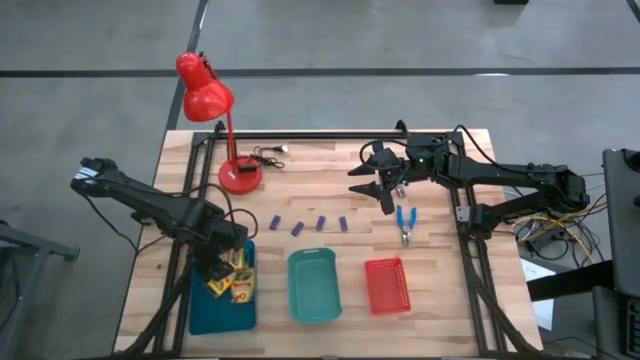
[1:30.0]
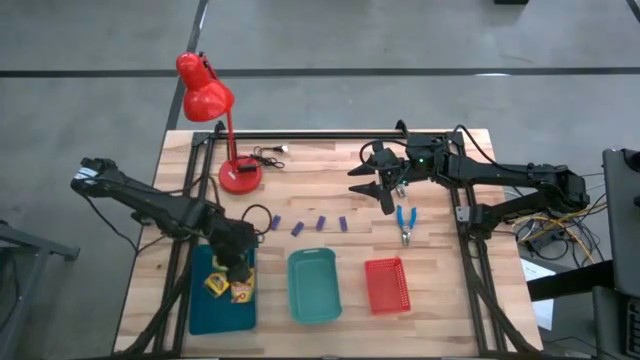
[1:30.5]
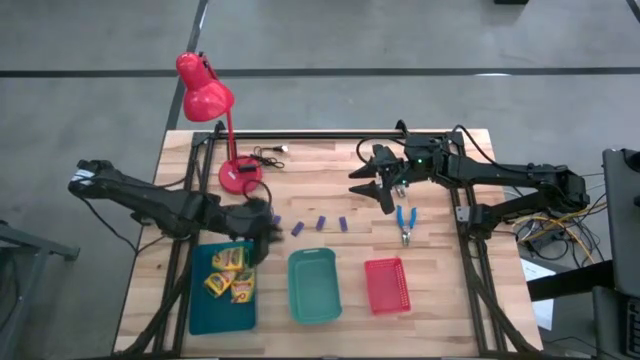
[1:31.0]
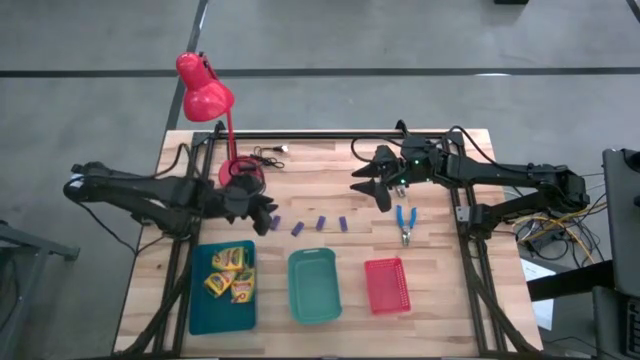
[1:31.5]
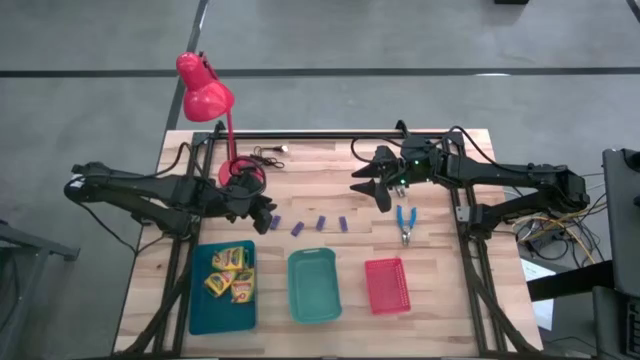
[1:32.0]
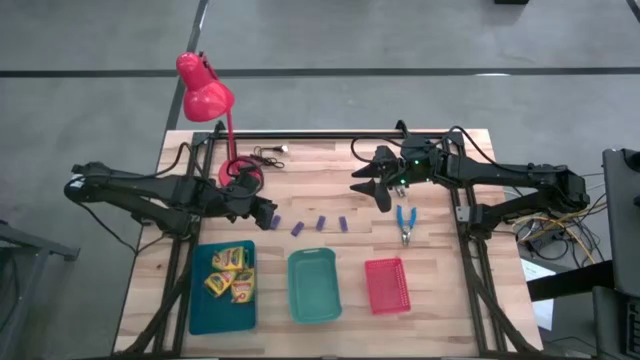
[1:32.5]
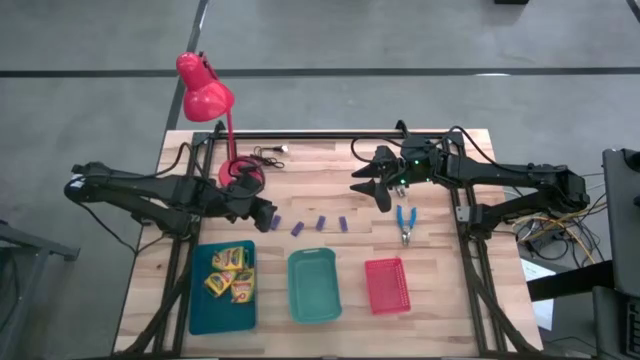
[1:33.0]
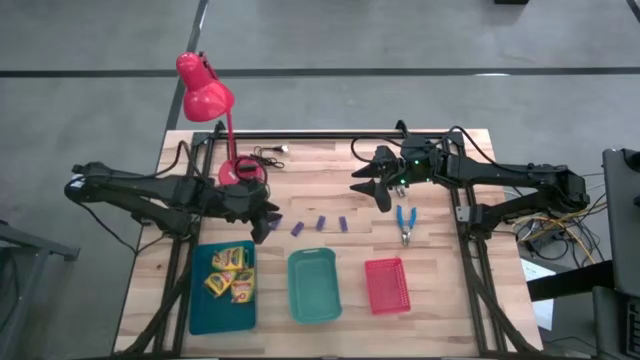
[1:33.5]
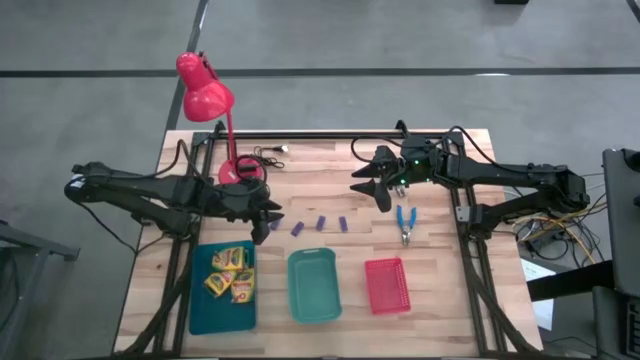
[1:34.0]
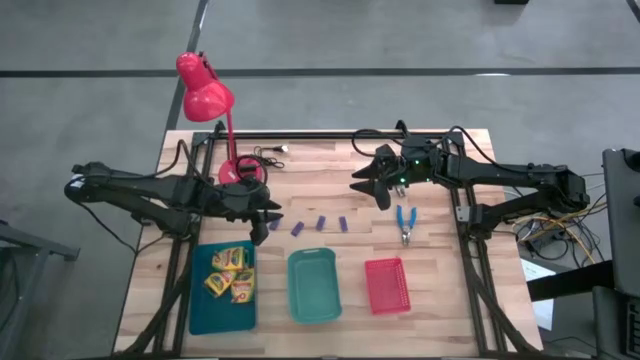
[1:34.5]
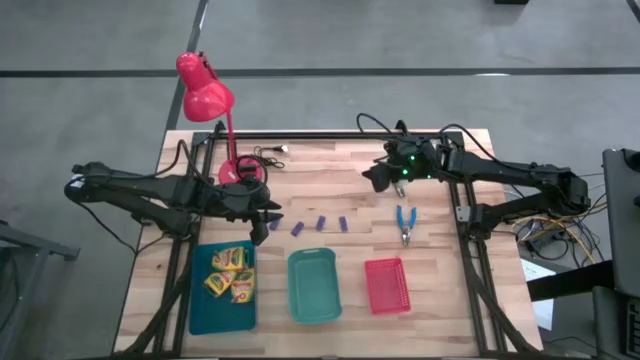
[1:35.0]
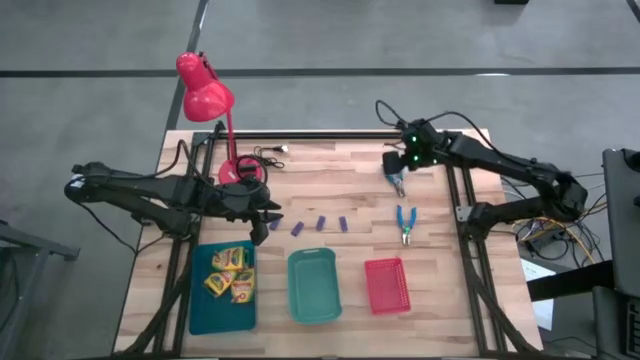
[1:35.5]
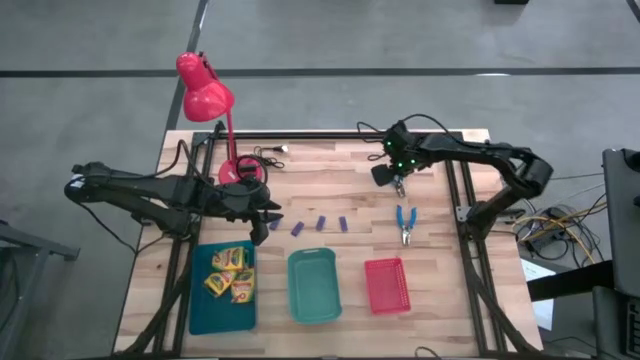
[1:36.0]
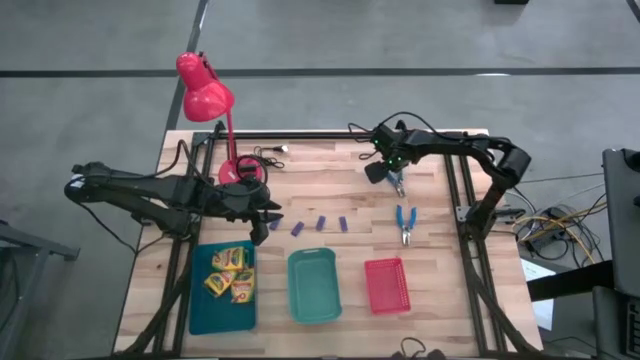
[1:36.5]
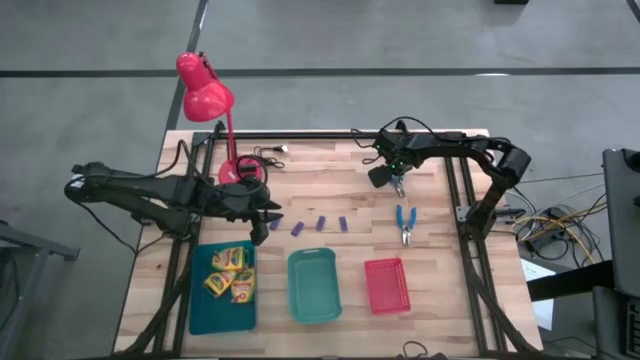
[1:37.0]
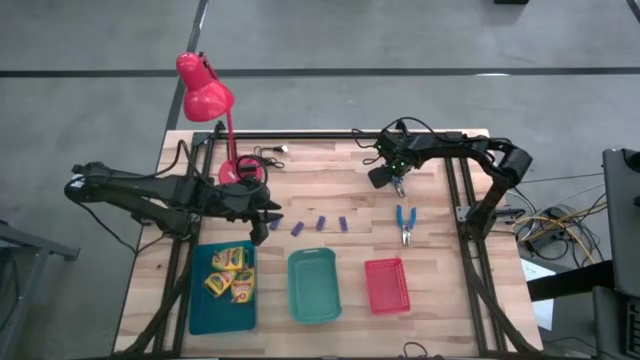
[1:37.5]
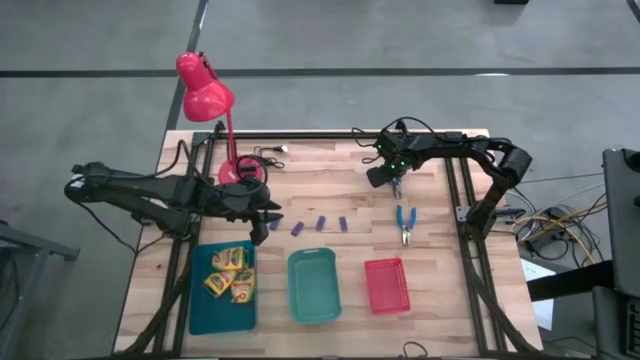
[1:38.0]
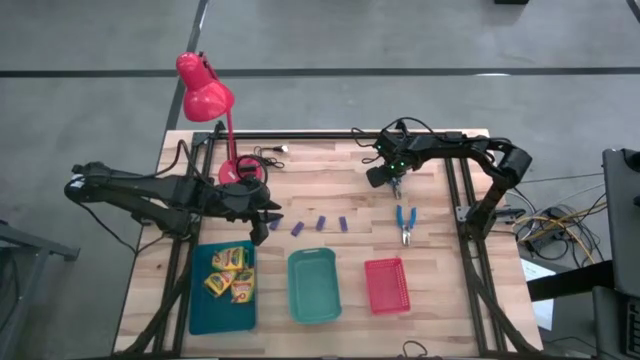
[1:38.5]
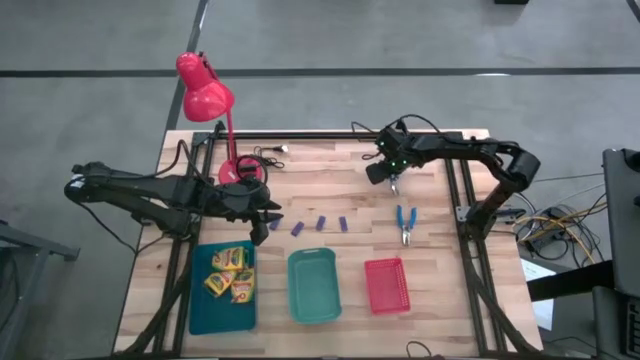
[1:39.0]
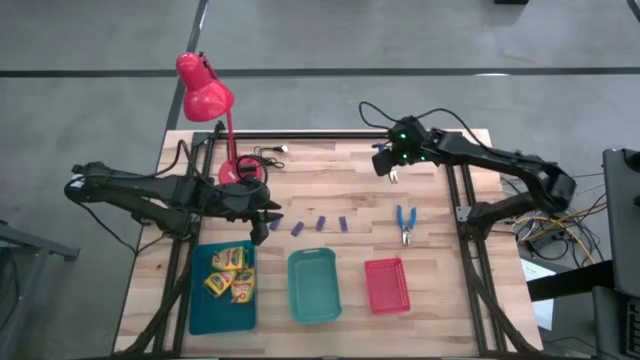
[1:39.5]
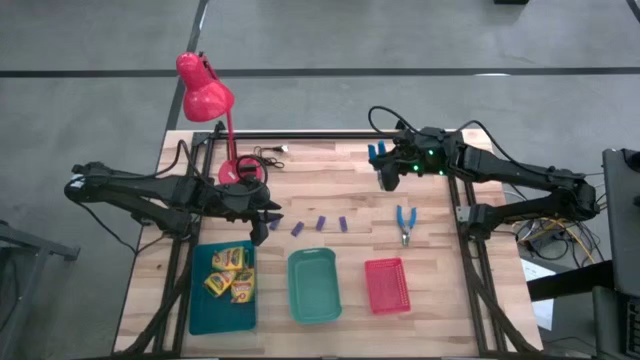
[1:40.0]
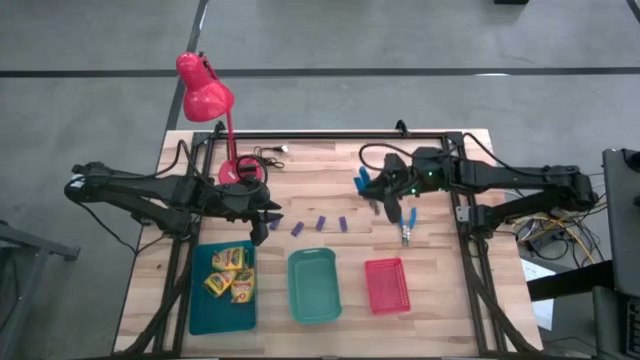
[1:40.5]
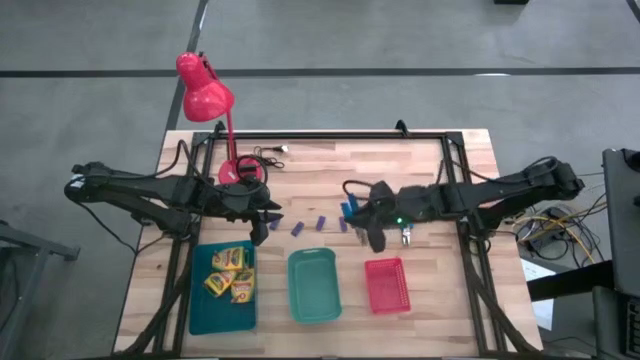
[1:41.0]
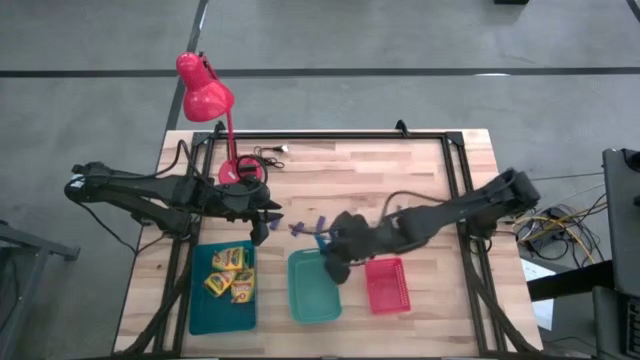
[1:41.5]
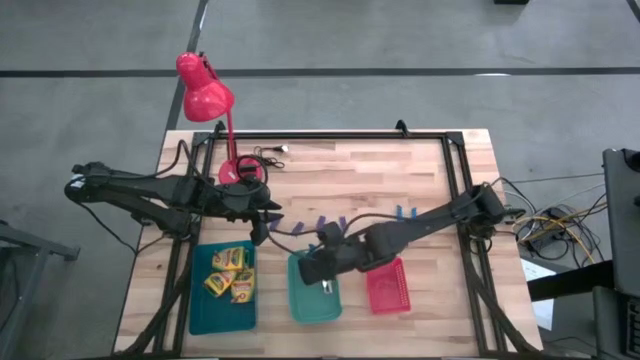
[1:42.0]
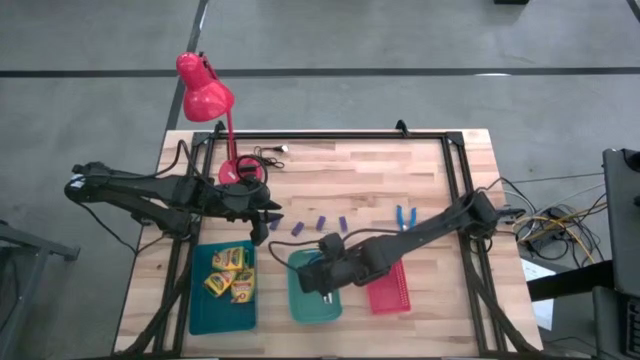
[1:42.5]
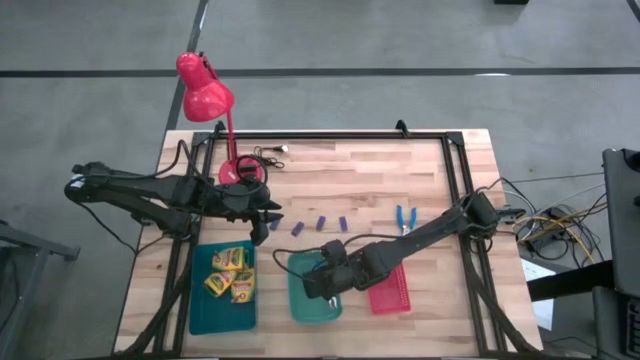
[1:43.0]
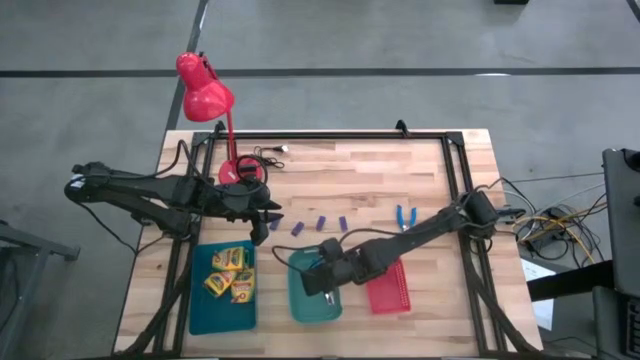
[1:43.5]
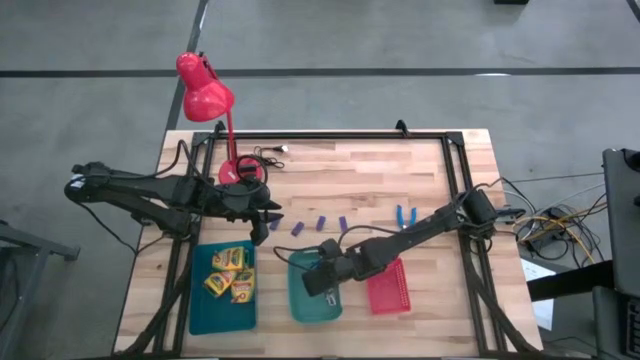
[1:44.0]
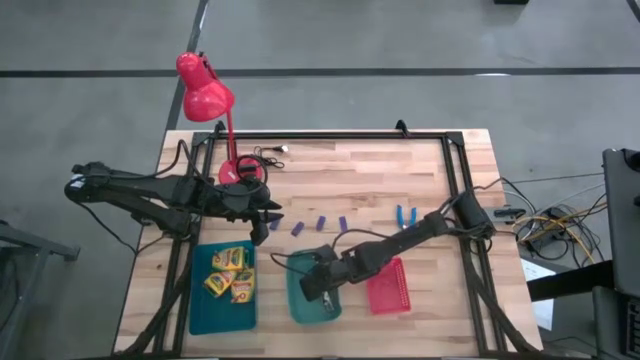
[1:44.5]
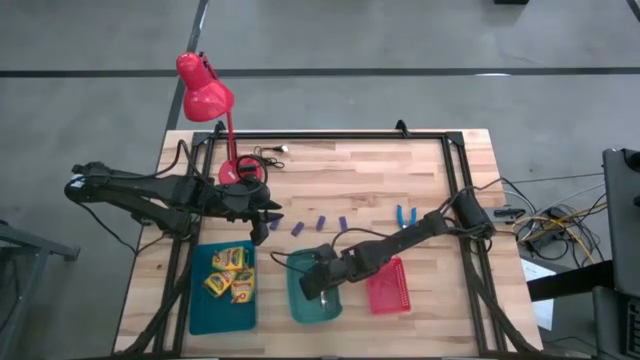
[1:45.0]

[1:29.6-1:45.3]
Task: Pick & Place School Supplies
Put the blue ticket punch into the green bin

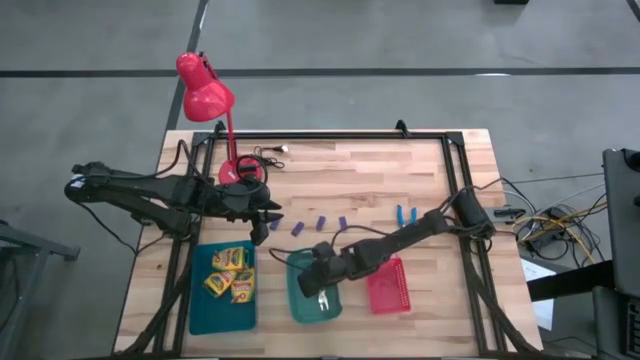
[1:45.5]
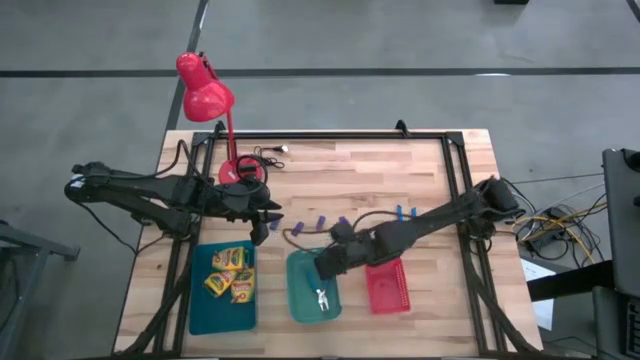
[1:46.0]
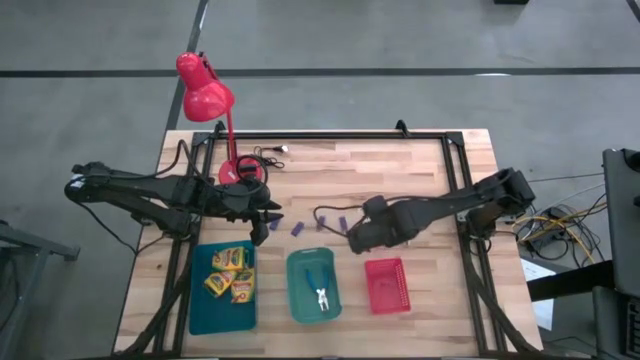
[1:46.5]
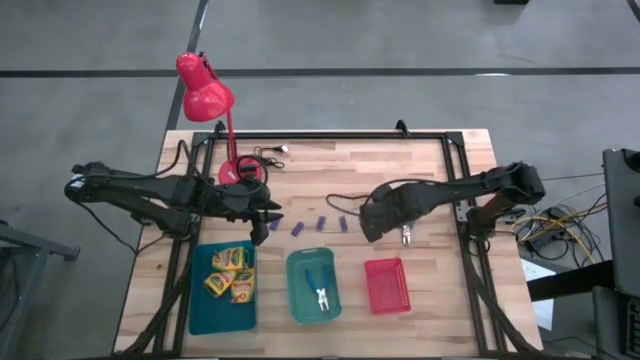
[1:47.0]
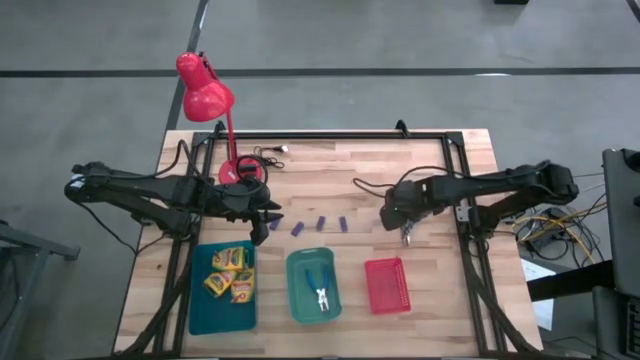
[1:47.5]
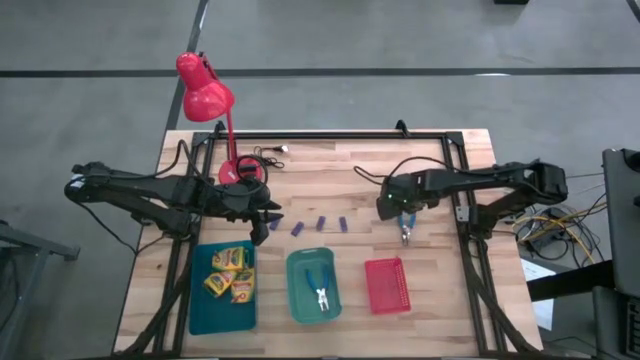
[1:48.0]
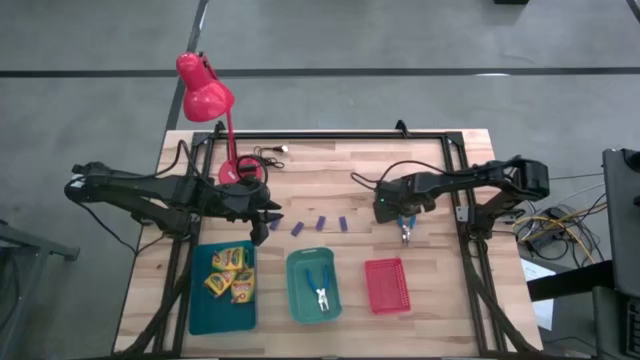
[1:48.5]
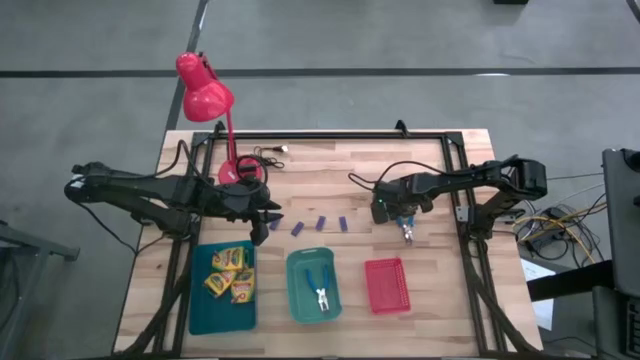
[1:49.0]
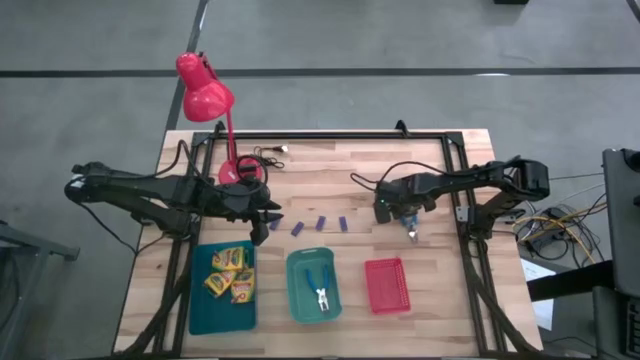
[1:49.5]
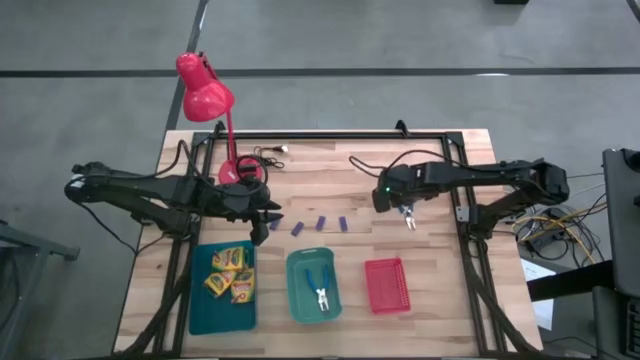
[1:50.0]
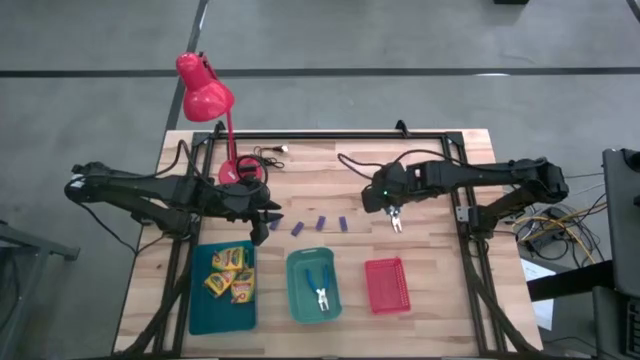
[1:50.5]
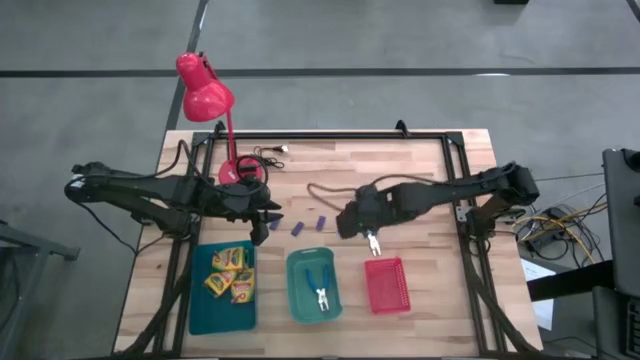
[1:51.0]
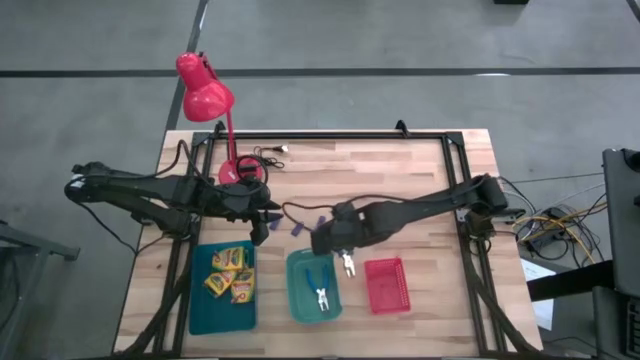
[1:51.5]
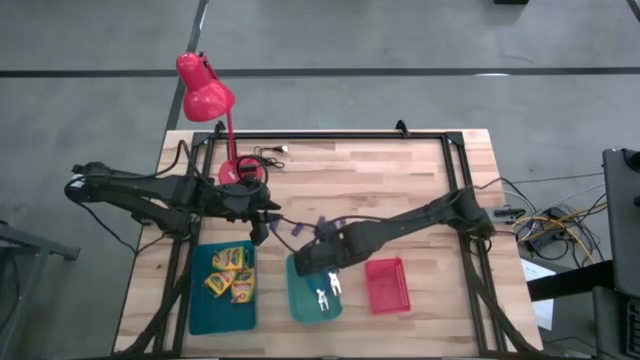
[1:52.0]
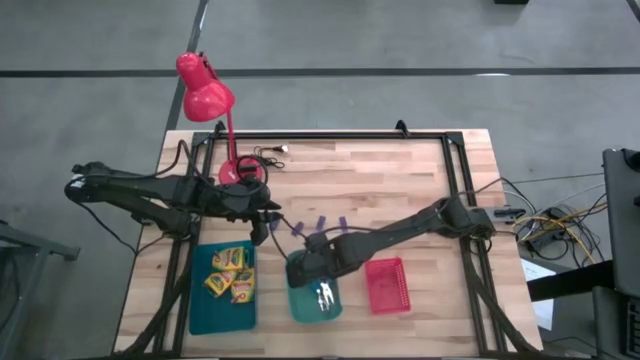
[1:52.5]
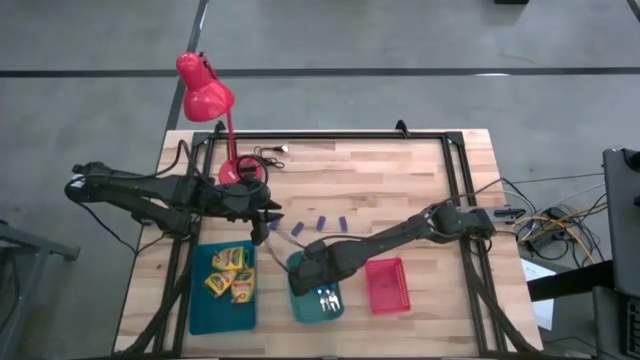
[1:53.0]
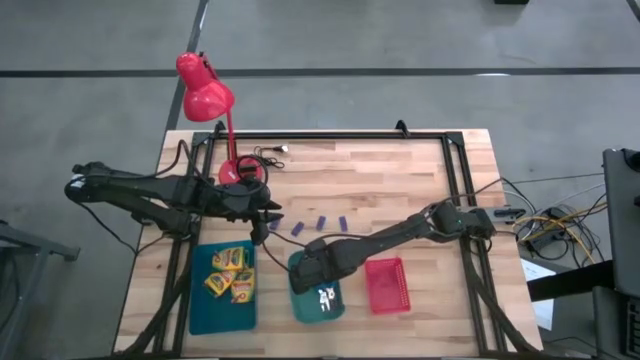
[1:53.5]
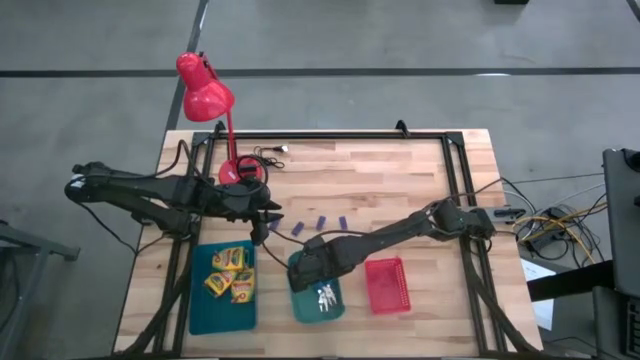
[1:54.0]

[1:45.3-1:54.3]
Put the blue ticket punch into the green bin
